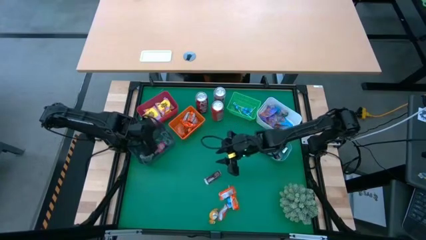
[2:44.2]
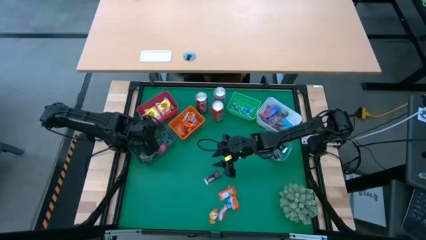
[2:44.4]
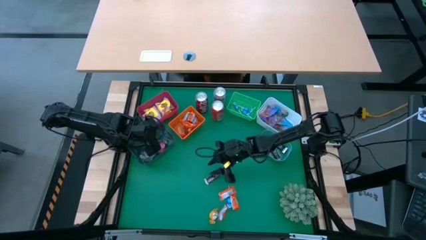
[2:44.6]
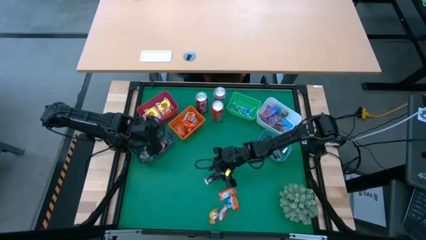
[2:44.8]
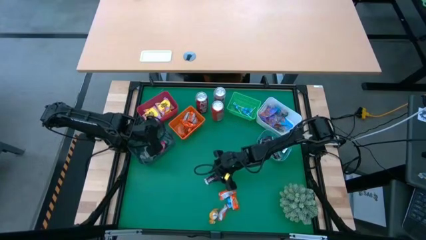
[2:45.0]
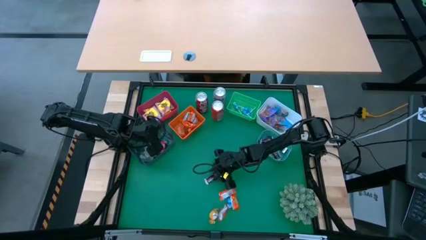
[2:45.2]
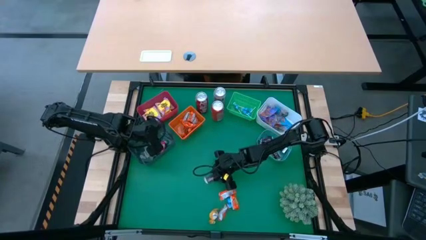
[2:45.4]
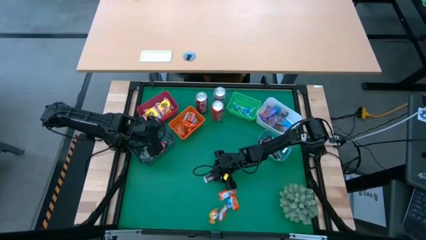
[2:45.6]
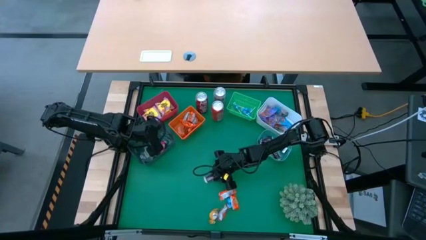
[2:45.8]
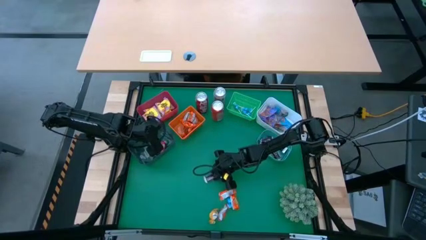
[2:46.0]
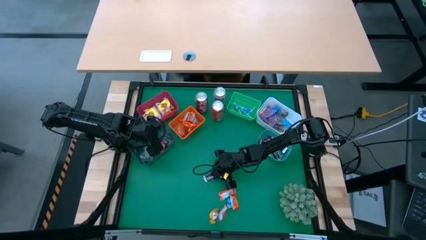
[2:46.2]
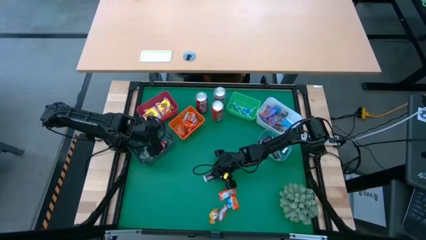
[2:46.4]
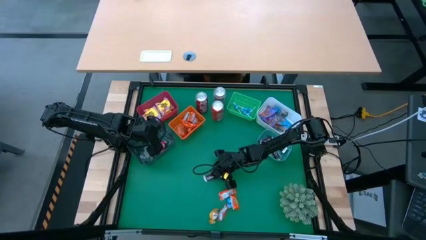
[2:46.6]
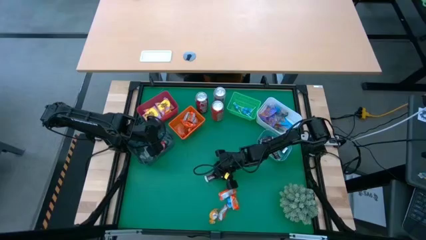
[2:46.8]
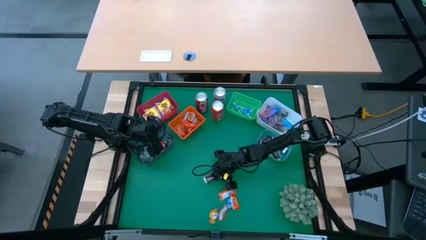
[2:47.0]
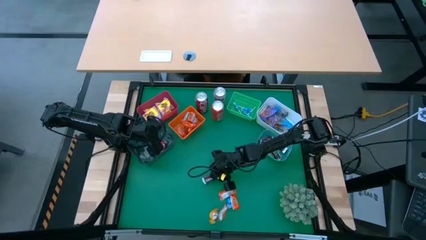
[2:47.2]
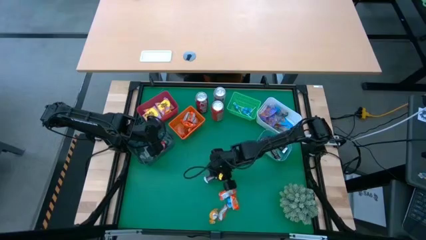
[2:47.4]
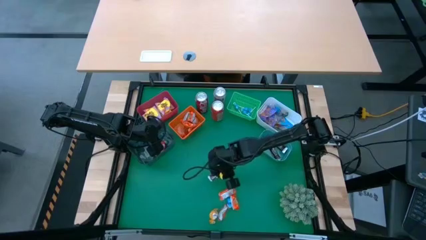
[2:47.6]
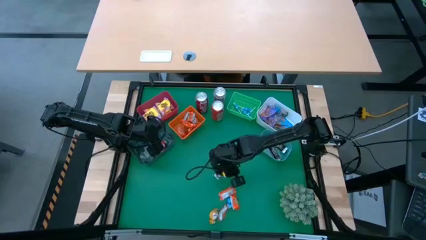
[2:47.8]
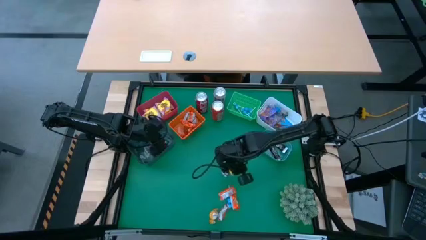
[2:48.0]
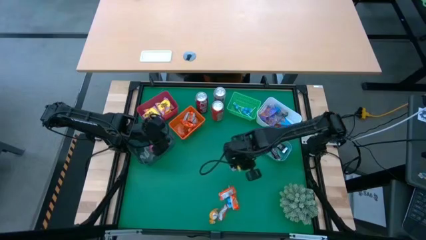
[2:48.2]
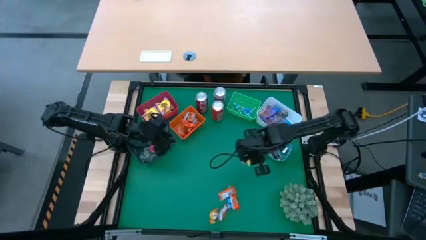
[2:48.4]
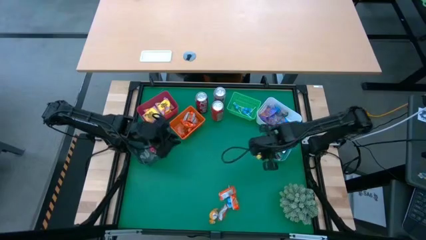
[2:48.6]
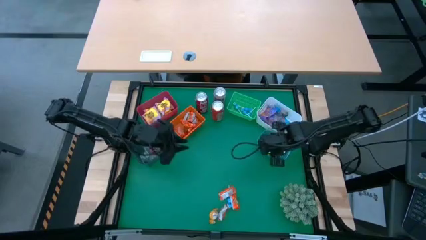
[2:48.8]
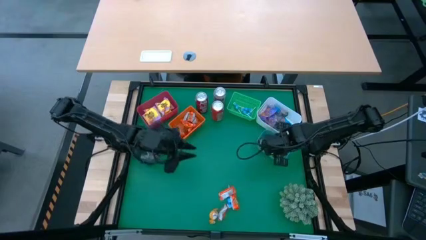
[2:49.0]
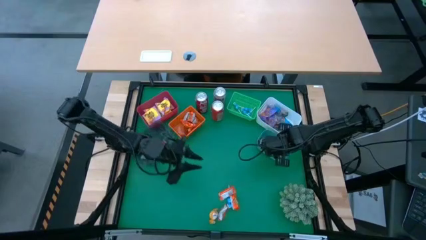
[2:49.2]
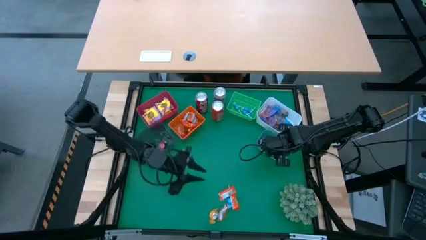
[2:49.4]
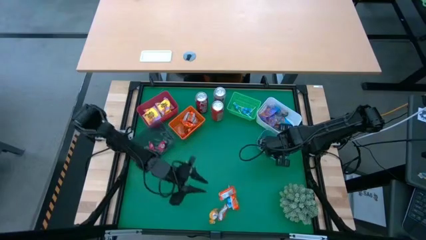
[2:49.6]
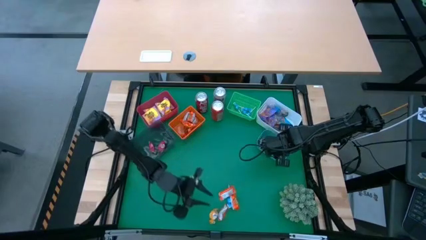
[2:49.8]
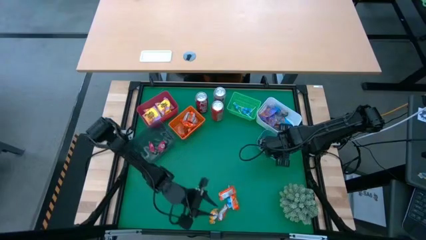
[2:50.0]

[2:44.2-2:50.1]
Task: Sort candy
Put the brown chocolate into the blue bin

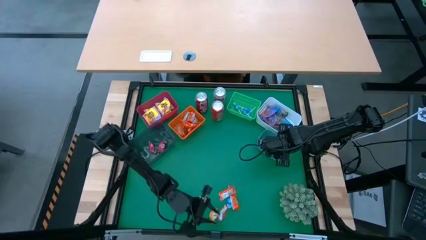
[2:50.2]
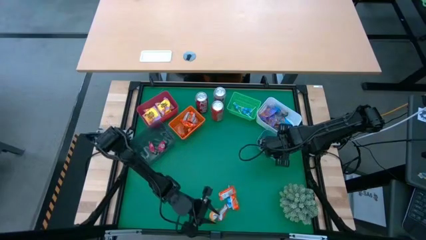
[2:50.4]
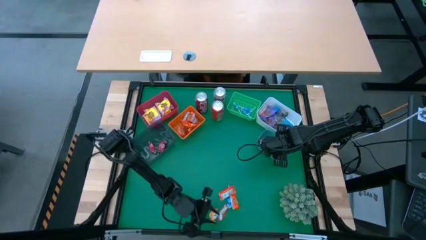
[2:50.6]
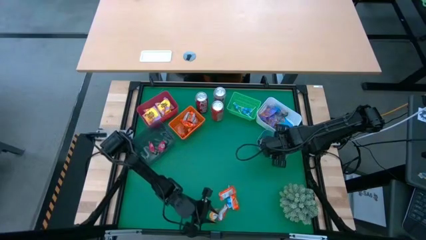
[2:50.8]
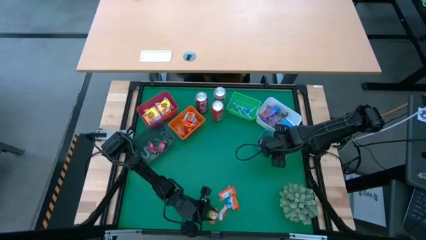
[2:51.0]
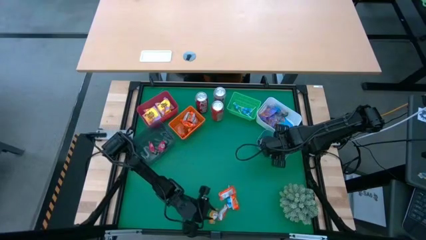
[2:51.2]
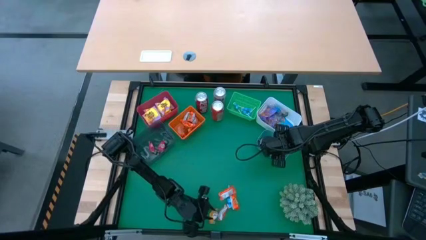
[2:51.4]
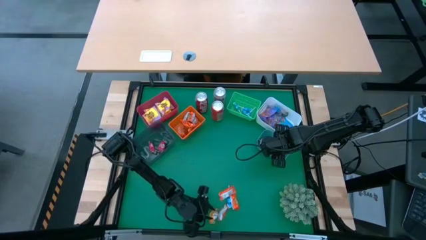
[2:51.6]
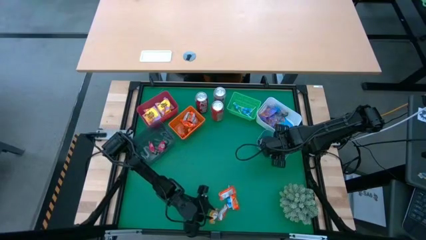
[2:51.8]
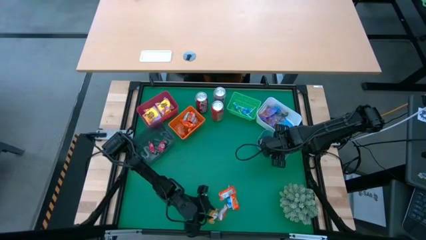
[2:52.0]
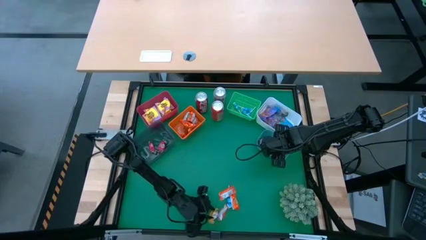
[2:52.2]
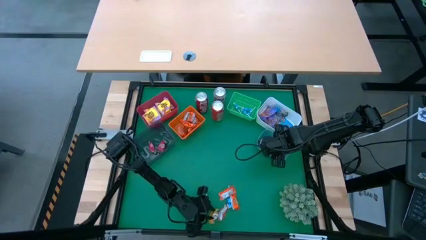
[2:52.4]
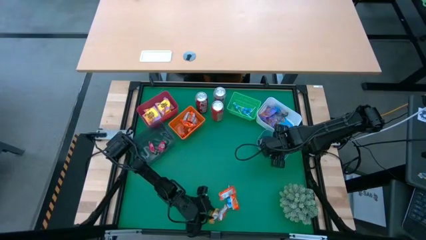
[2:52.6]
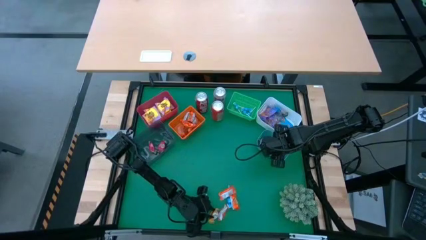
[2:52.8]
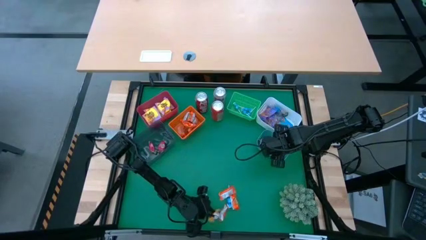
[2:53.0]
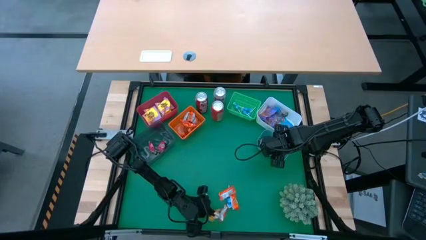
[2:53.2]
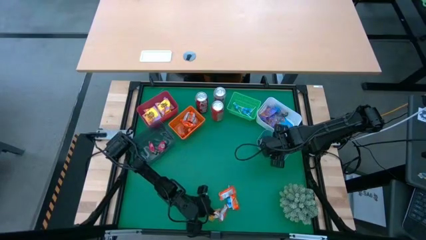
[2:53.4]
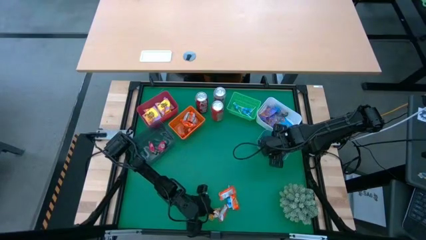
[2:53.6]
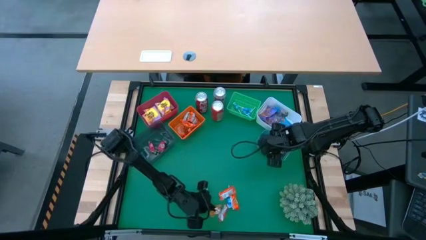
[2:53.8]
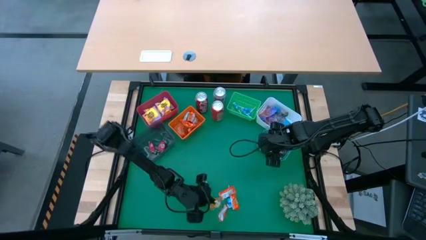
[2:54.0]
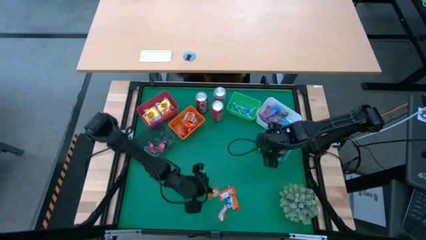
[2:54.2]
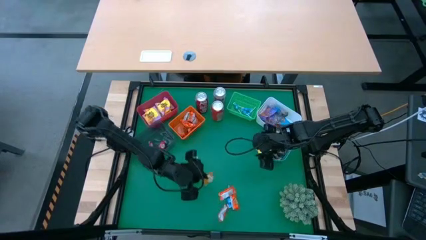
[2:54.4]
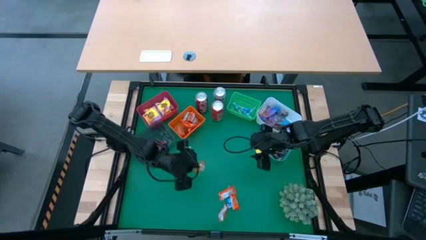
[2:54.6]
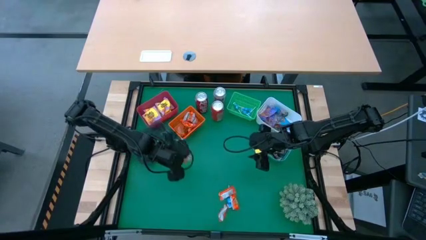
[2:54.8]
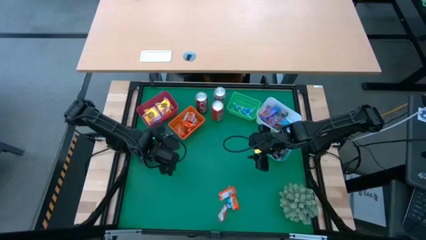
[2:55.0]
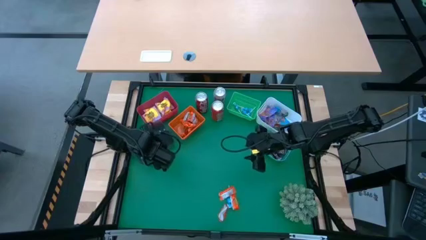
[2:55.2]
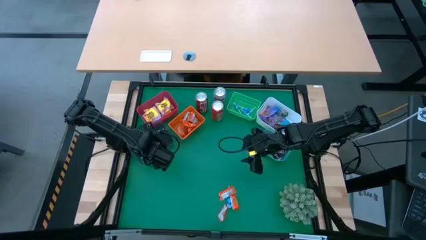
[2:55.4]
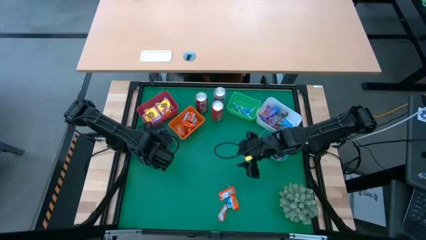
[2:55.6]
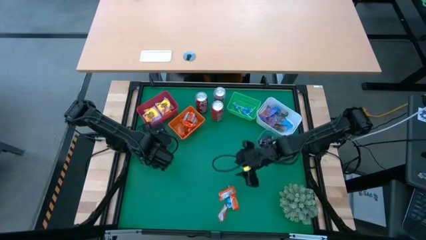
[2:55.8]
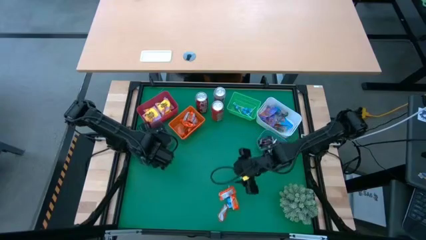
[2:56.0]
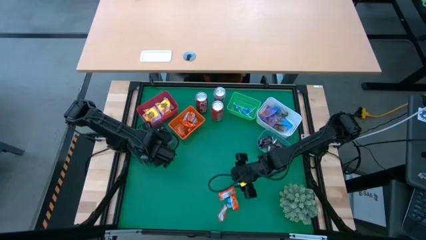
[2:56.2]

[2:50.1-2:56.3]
Put the yellow candy into the black bin

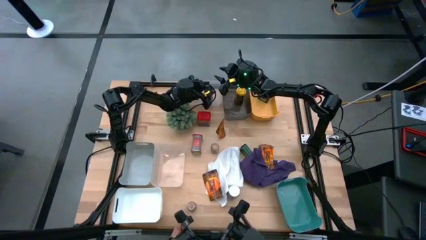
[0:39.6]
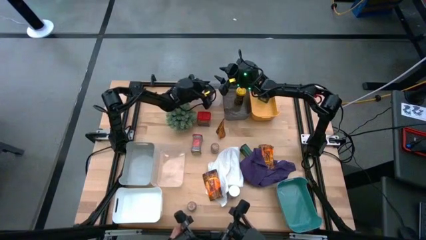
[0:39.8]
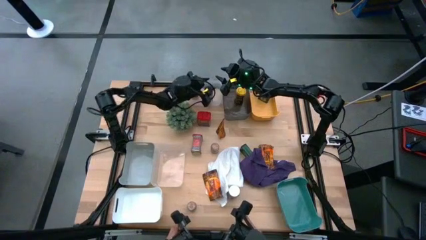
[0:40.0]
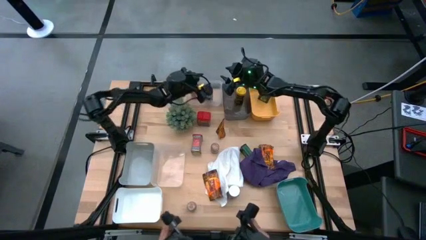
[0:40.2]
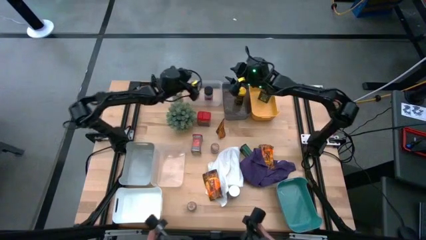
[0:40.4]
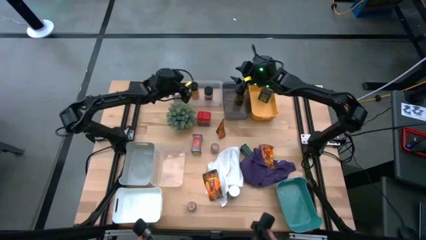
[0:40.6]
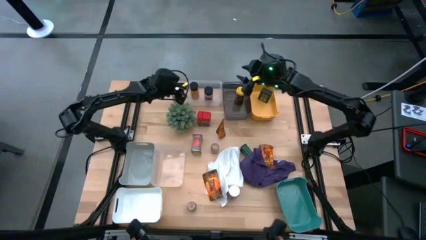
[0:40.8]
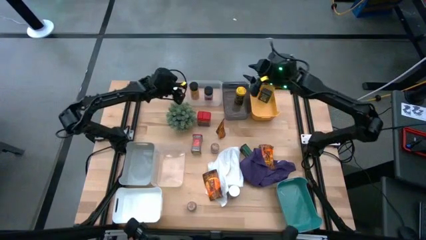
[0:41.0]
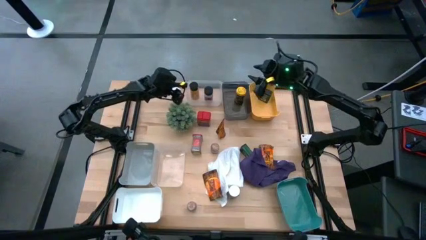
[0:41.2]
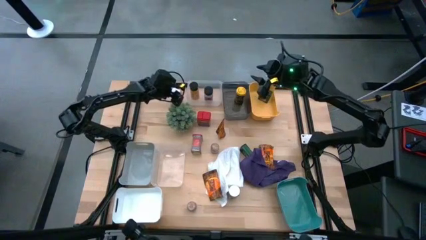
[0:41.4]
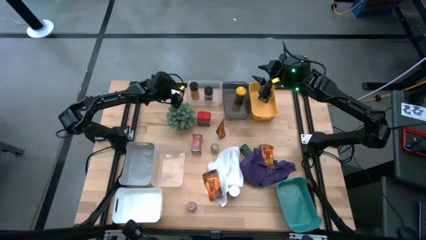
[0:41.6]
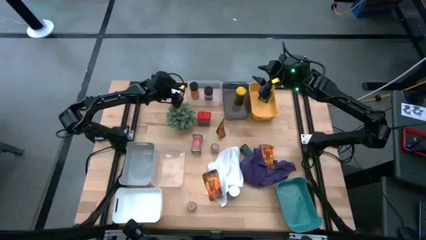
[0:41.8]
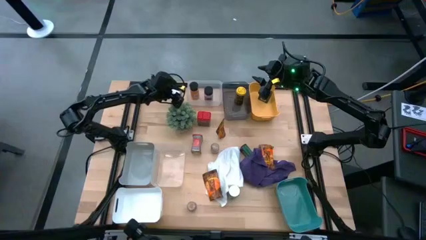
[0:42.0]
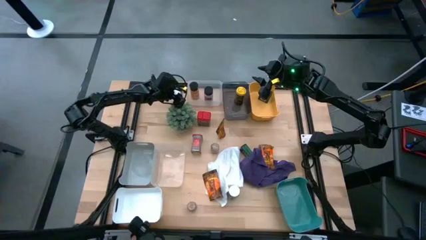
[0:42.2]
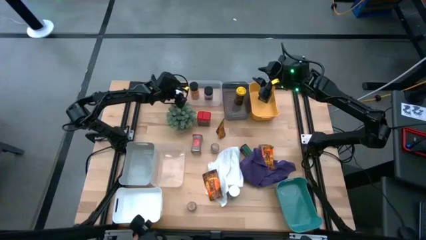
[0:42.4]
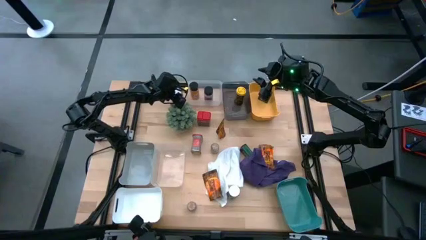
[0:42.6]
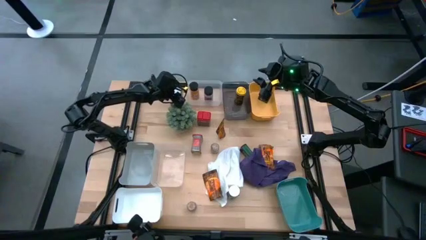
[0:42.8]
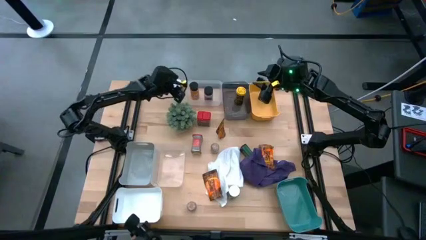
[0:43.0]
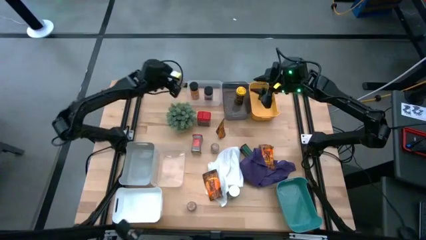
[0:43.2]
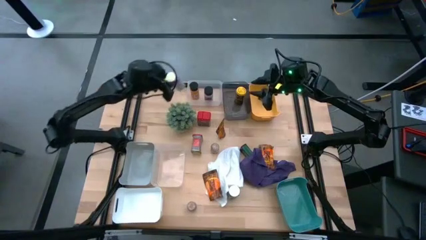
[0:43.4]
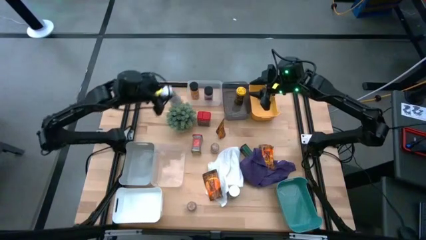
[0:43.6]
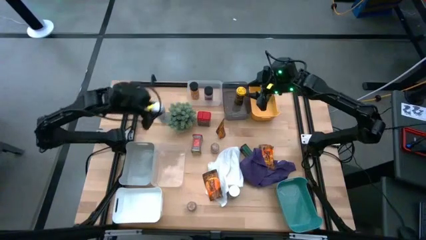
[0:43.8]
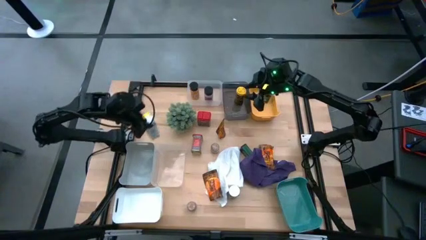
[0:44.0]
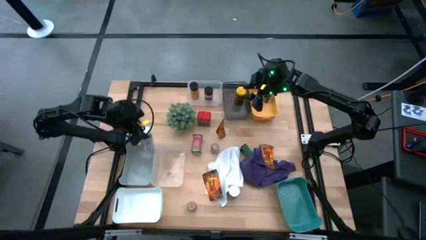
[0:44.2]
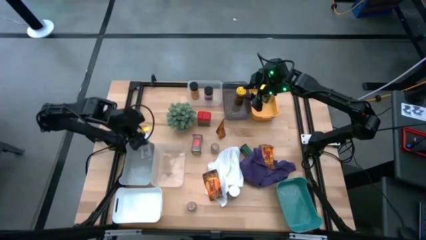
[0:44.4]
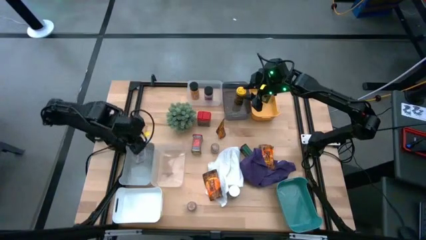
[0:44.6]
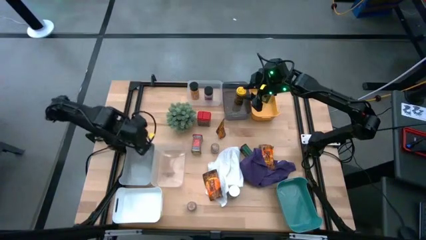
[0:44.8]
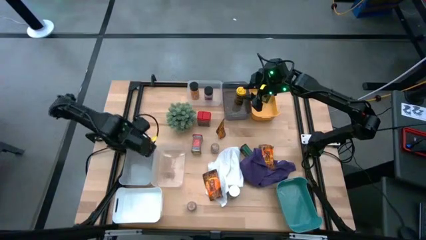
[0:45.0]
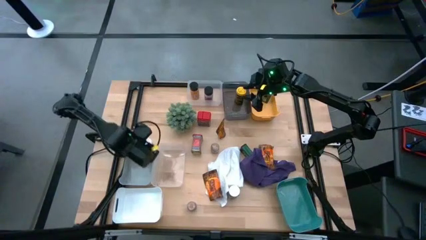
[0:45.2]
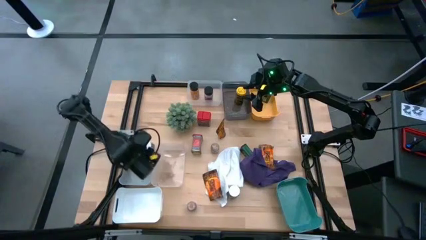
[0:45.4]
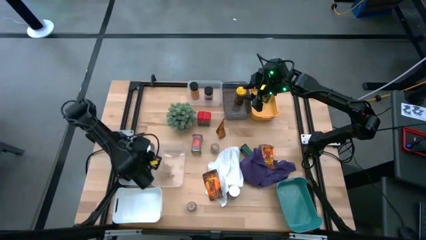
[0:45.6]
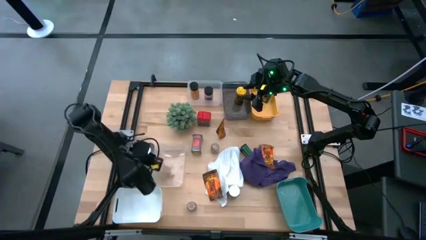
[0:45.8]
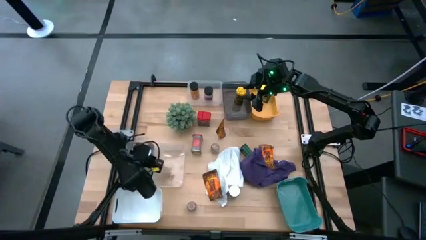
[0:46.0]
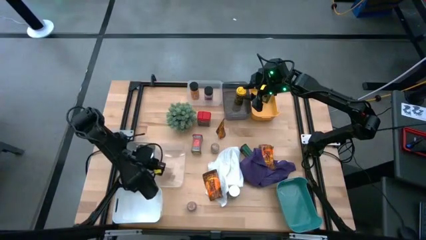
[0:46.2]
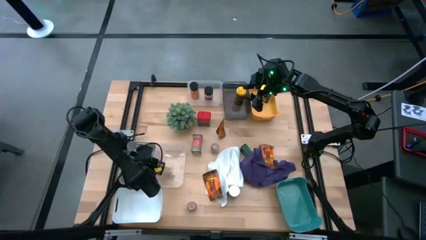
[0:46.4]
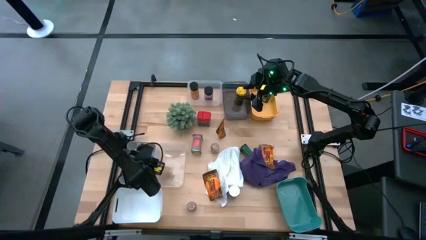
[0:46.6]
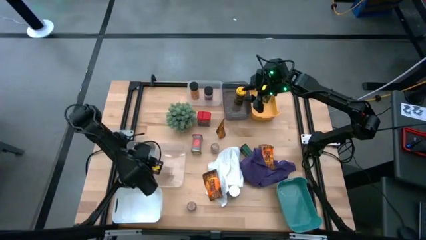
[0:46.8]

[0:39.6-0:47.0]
Task: Sort spices by type
Put the top white seasoning bottle into the gray bin
